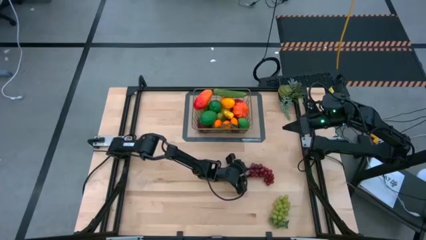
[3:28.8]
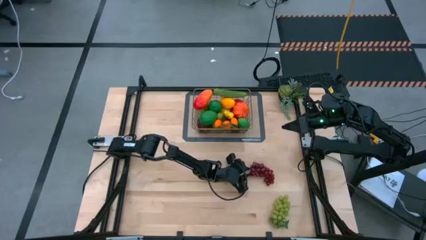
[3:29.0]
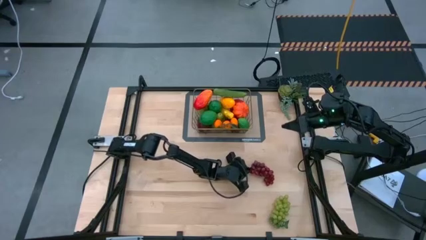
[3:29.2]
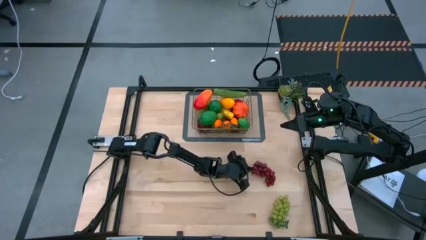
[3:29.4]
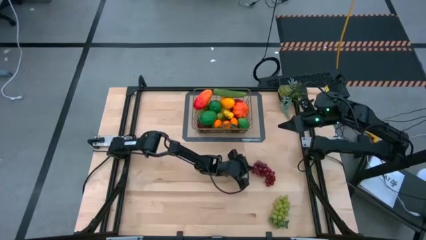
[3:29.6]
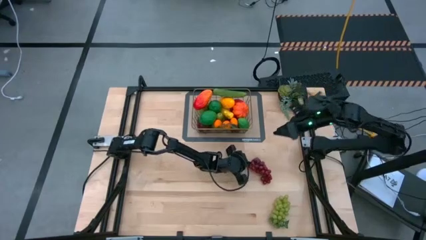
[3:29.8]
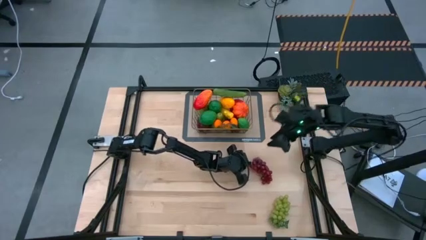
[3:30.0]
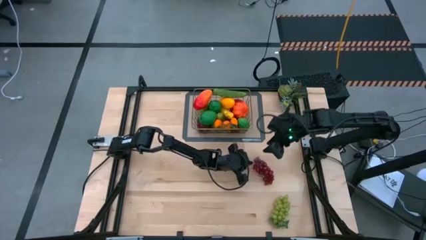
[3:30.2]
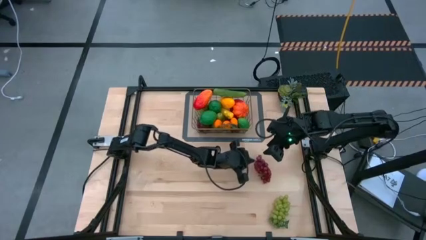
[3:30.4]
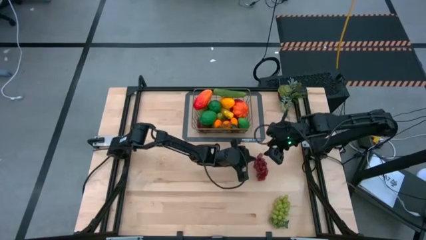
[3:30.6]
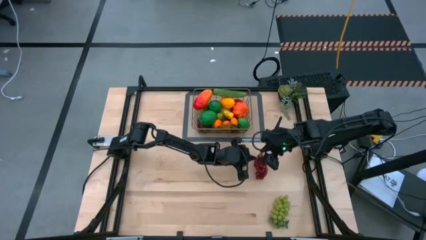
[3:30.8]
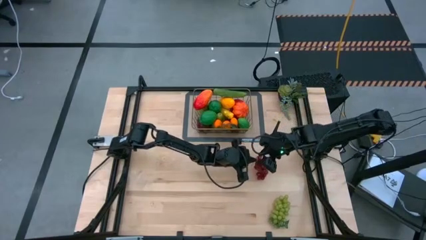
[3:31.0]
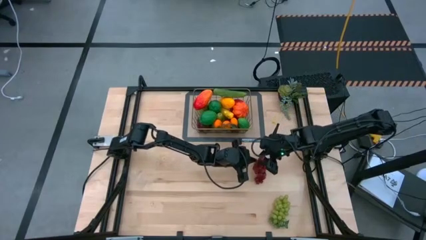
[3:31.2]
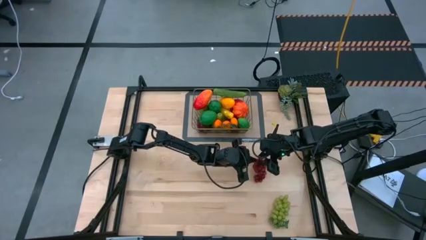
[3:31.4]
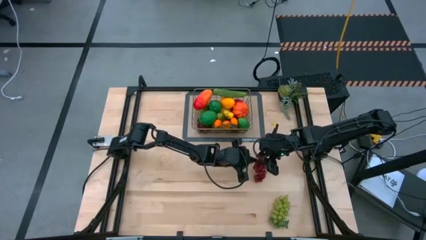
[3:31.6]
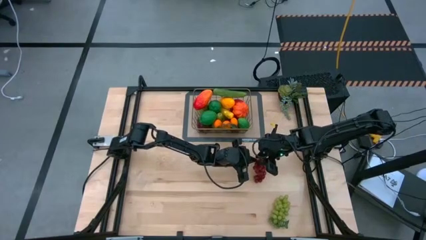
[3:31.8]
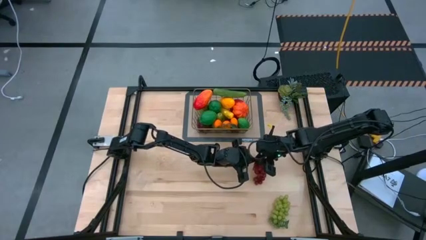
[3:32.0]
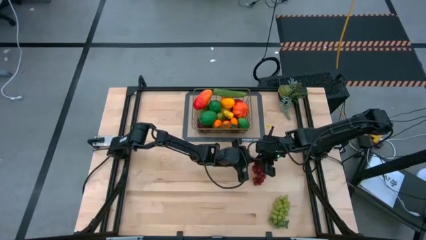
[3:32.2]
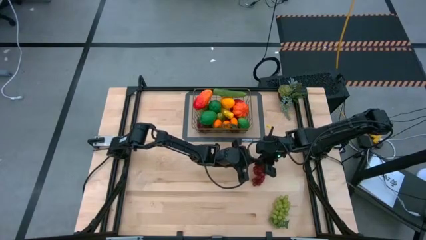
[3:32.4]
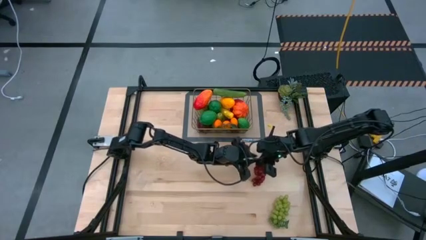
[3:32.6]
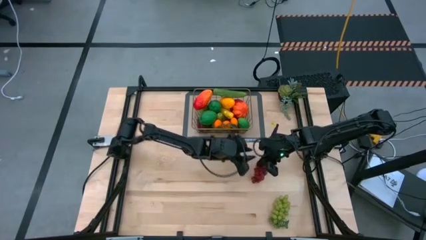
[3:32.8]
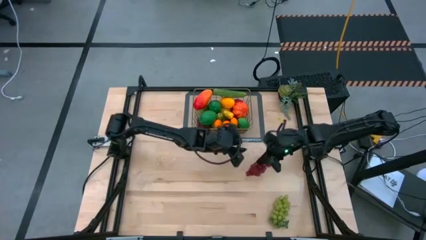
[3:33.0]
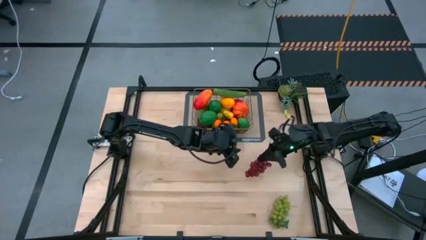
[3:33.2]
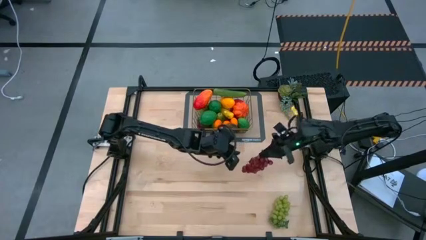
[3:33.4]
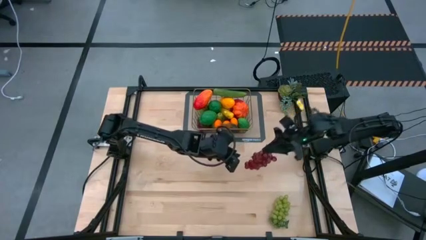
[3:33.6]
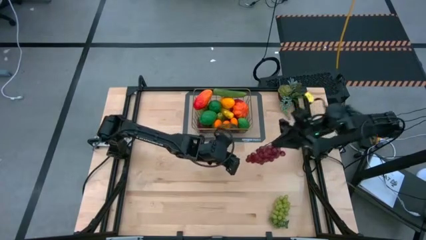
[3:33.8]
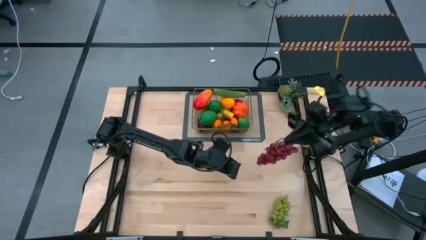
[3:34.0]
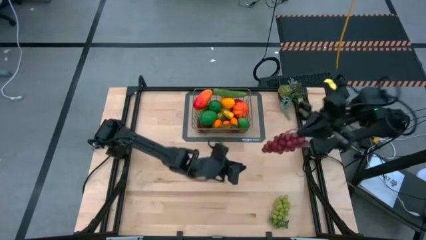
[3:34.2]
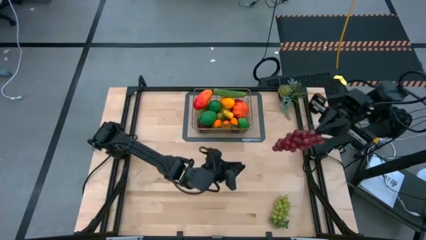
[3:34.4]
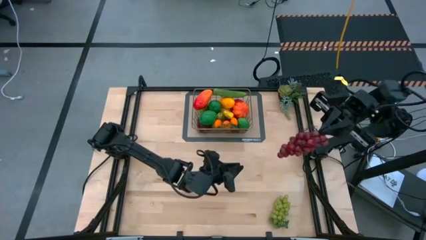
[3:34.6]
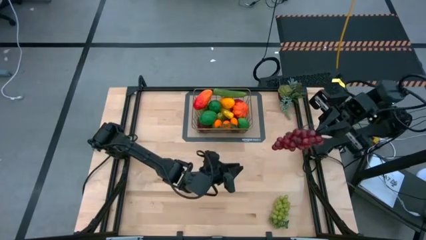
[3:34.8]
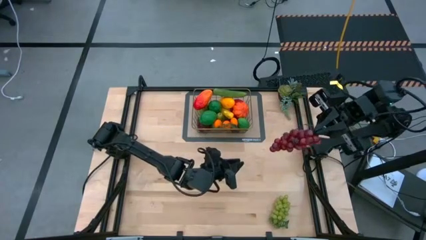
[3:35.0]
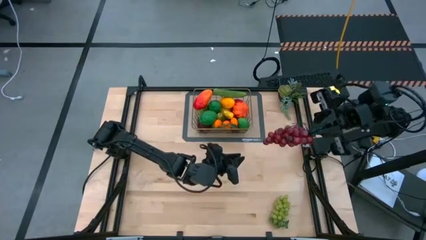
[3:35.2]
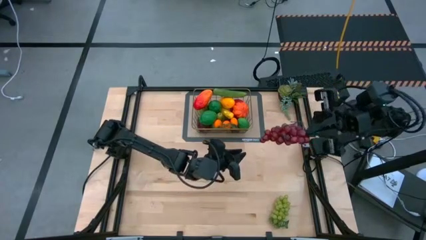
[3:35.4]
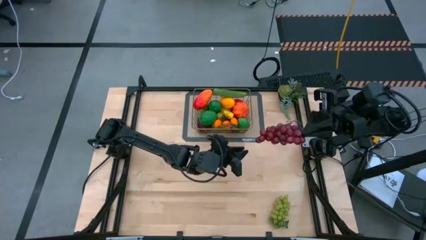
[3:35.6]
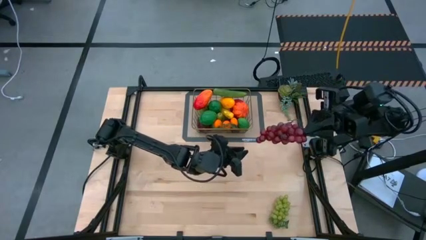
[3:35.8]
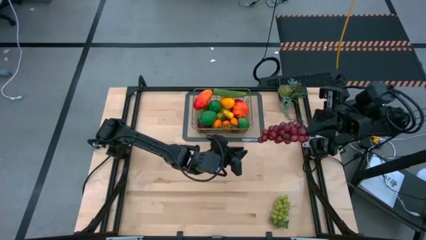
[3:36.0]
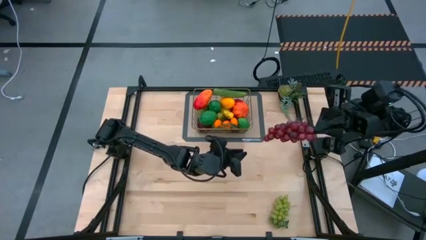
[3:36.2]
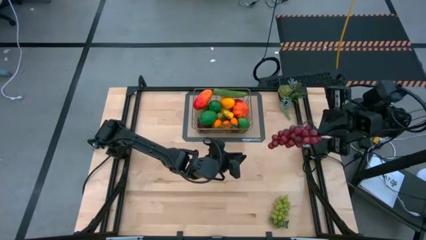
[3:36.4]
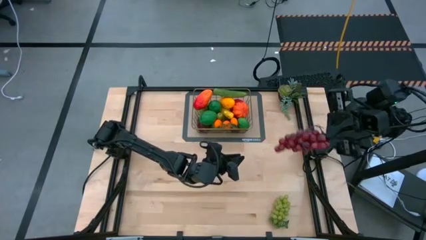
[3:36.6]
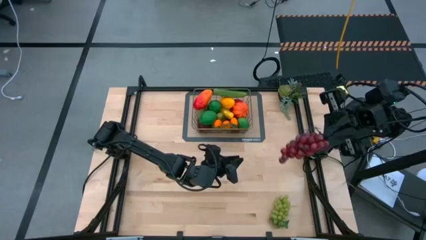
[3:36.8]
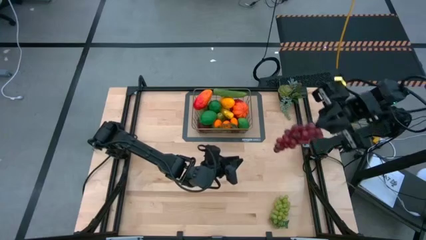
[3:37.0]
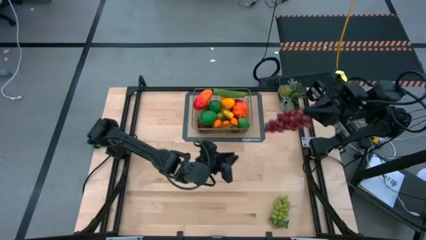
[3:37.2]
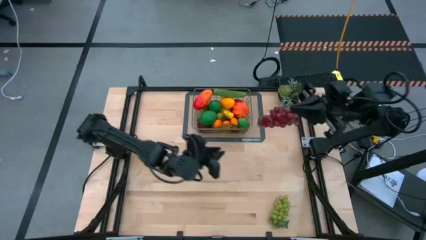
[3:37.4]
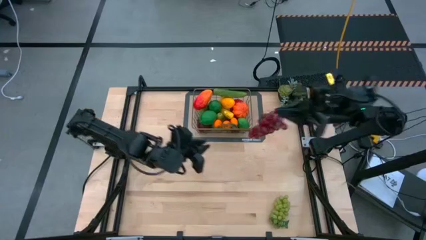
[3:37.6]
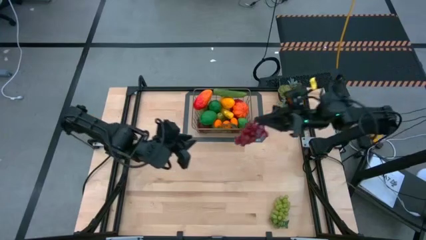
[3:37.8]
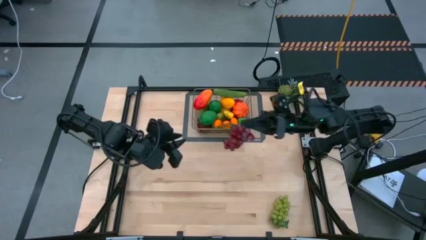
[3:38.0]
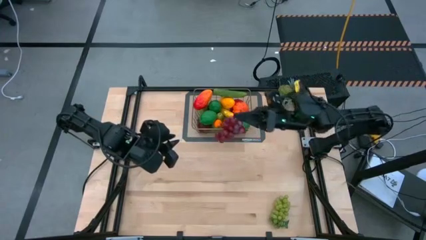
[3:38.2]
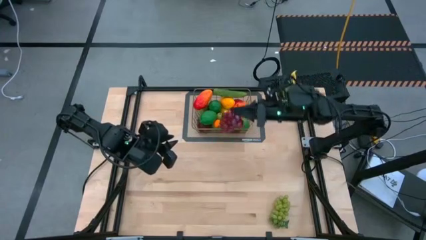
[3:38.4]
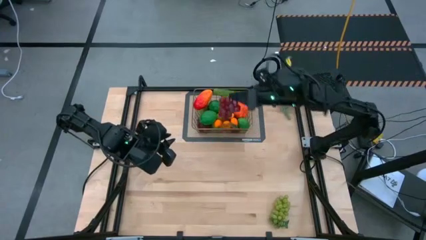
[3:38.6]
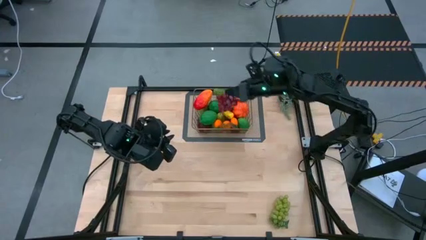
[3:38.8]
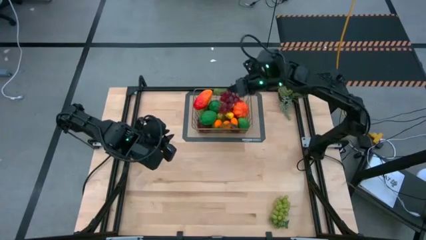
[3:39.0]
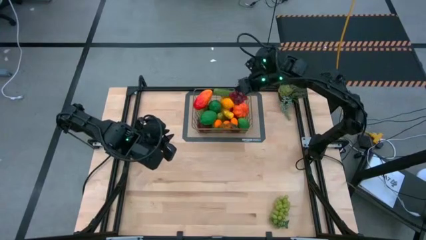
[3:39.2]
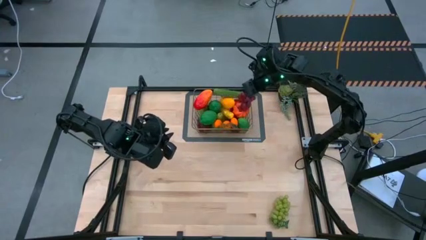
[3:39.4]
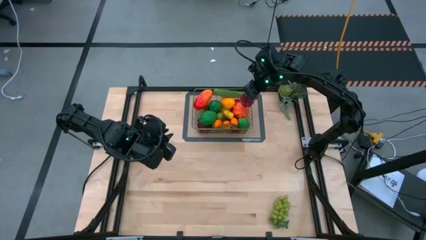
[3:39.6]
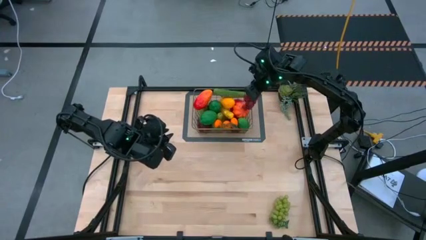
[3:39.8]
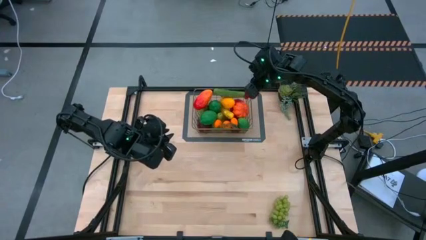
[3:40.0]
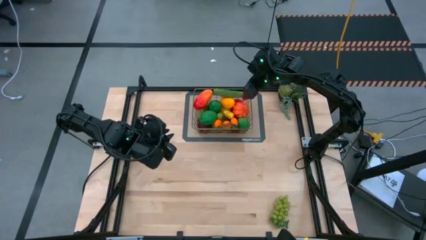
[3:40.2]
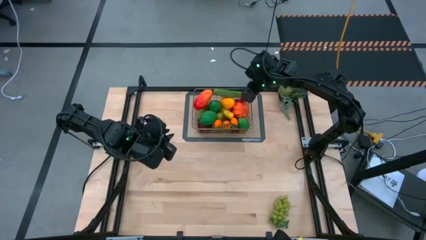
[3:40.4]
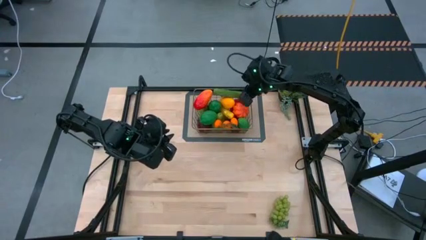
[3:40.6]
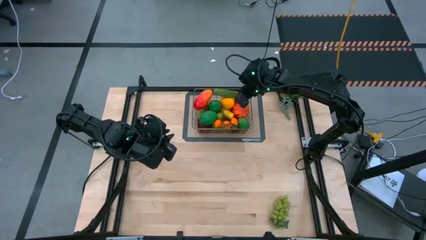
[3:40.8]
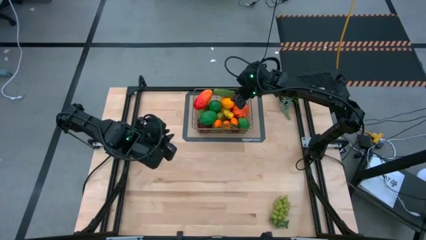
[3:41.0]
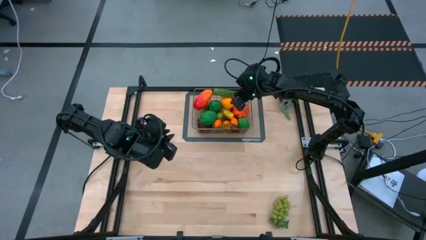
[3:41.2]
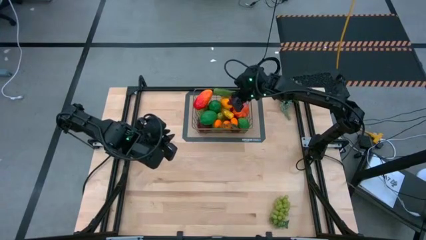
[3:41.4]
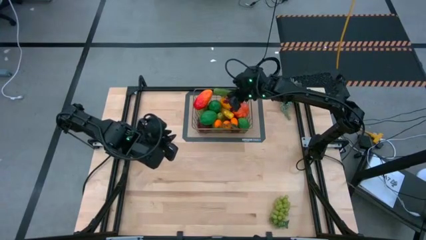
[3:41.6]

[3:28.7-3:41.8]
Task: Build produce basket
Put the red grapes into the brown wire basket

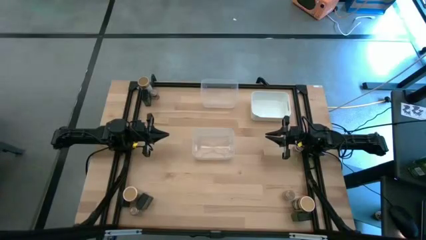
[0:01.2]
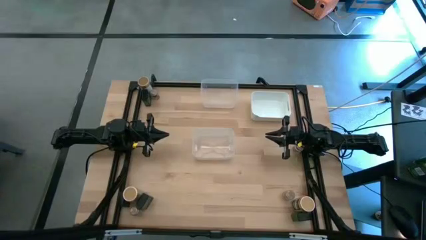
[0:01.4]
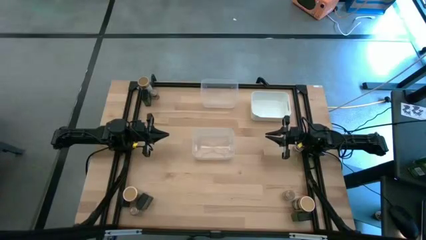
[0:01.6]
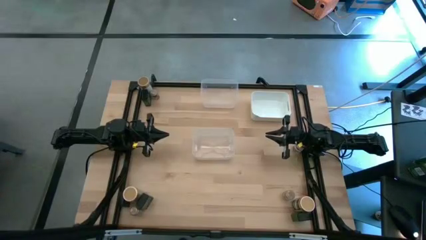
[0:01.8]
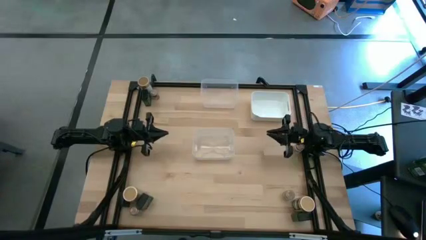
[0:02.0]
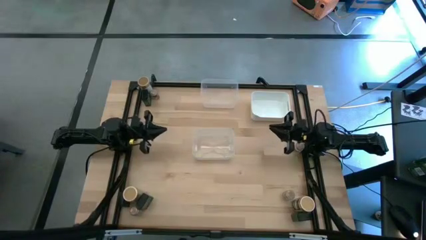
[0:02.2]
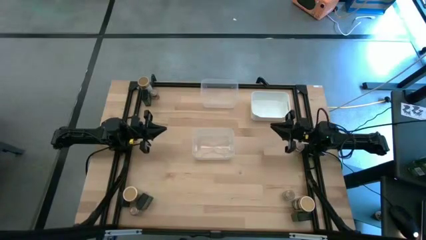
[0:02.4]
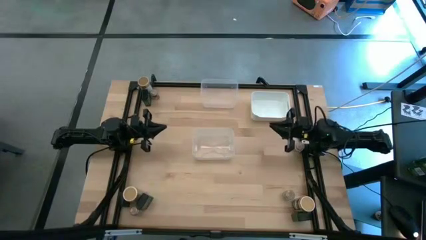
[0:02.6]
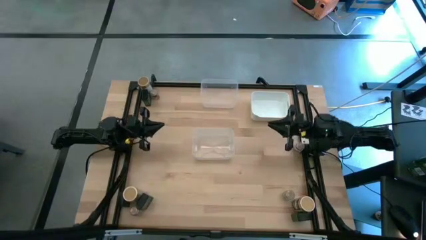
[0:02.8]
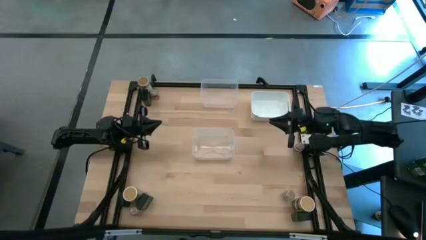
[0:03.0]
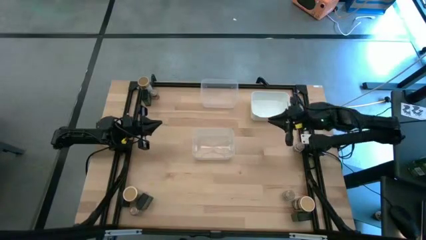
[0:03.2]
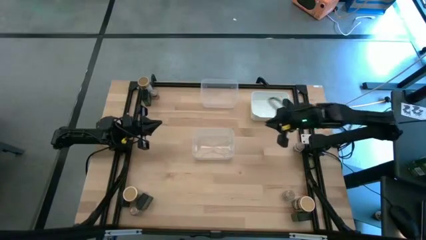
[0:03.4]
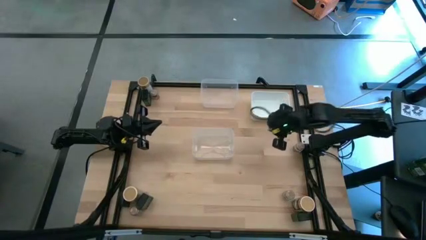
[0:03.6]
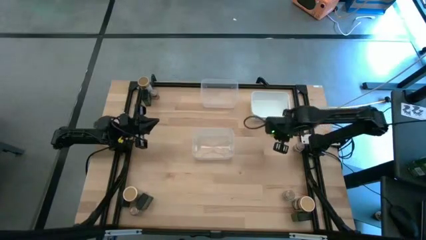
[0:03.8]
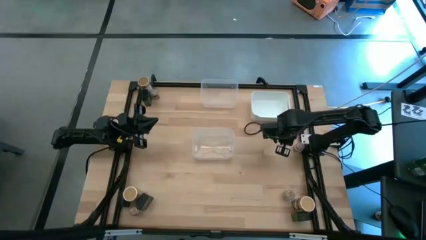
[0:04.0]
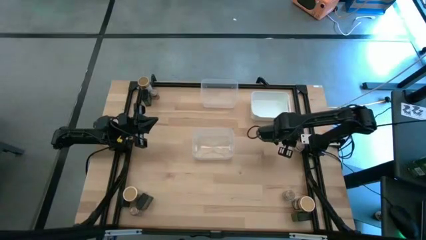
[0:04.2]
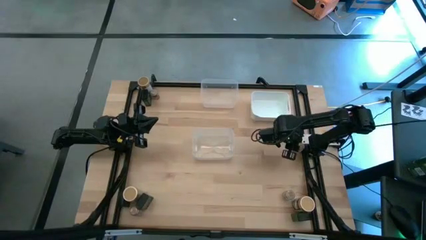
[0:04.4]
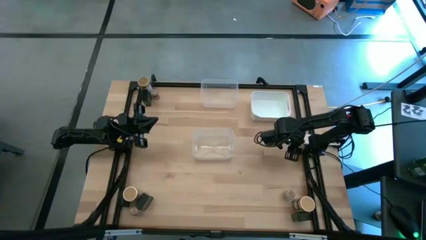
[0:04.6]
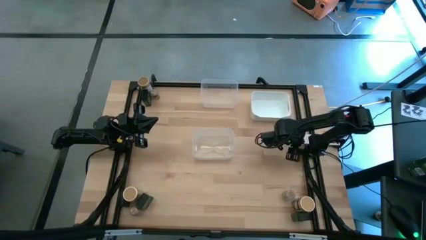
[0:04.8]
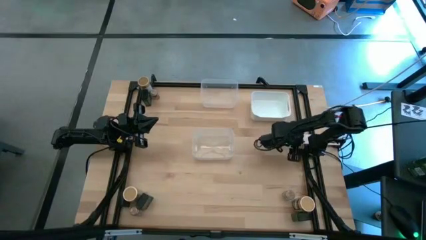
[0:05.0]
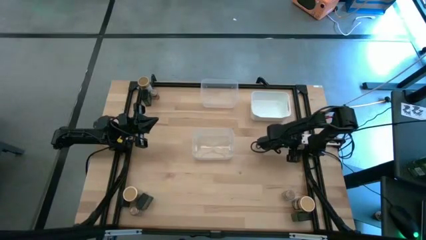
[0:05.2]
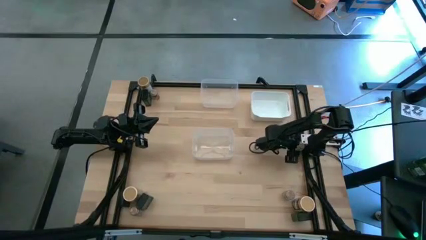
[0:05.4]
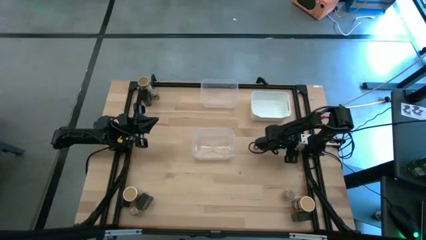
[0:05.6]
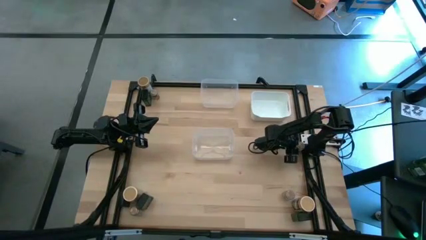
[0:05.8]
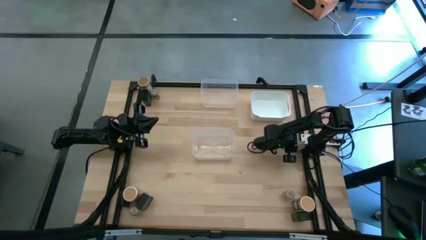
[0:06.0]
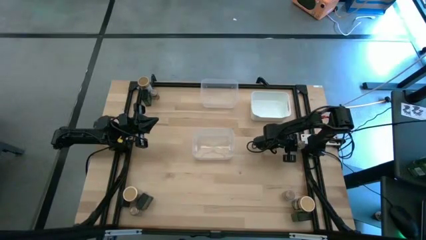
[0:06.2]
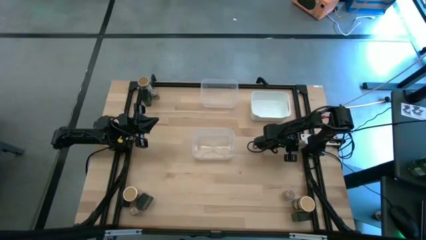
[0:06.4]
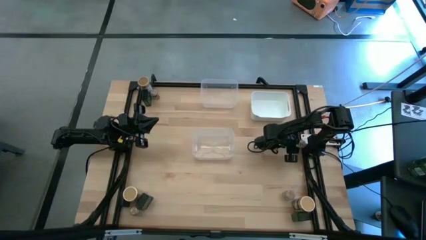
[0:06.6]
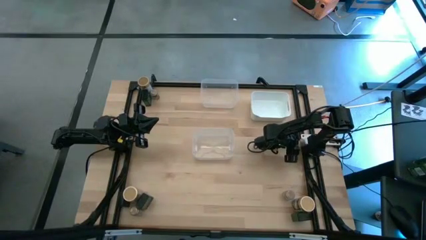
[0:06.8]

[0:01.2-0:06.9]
Task: Sort spices by type
Put the middle right transparent seasoning bottle into the bottom transparent bin
